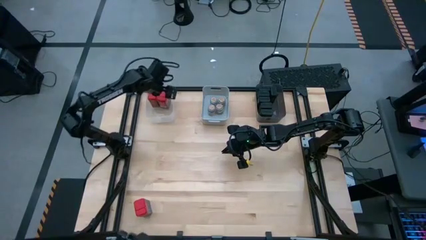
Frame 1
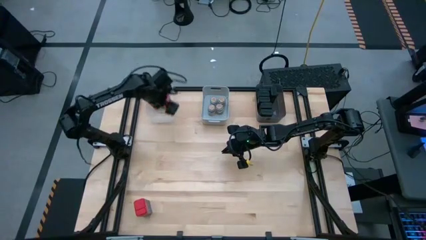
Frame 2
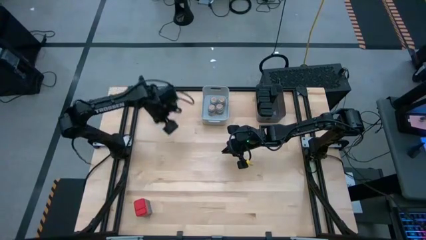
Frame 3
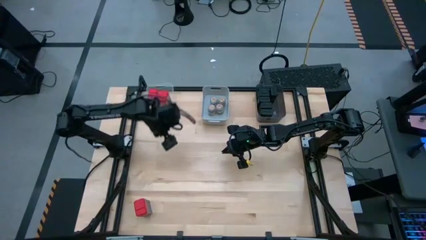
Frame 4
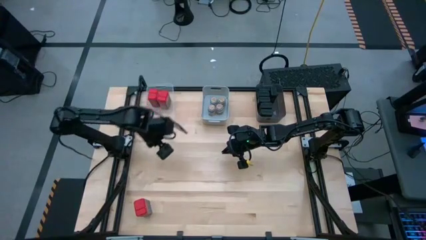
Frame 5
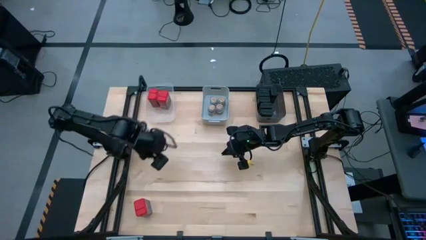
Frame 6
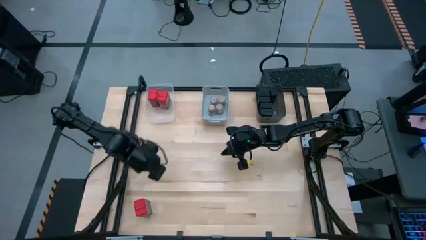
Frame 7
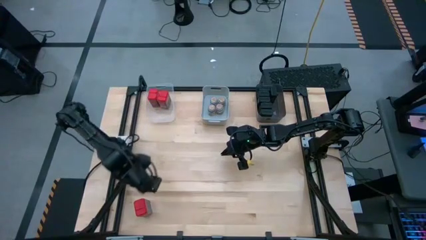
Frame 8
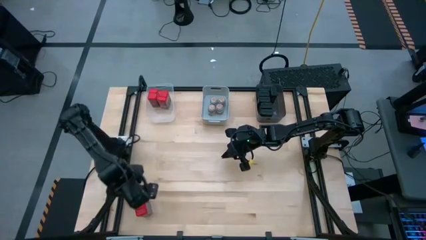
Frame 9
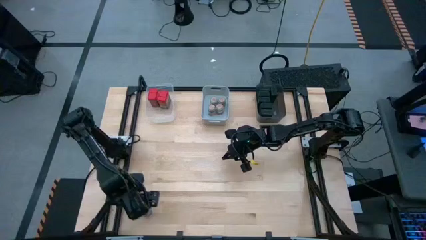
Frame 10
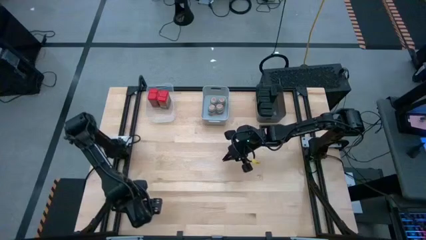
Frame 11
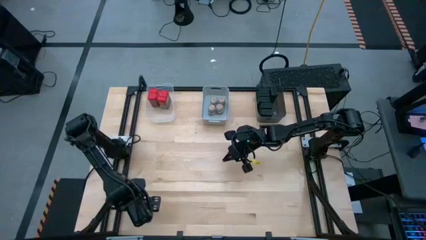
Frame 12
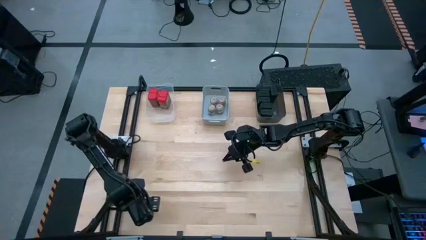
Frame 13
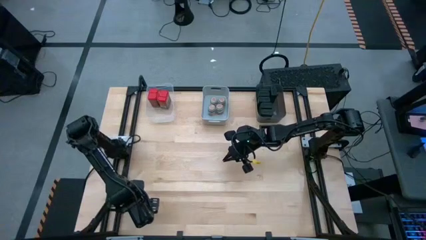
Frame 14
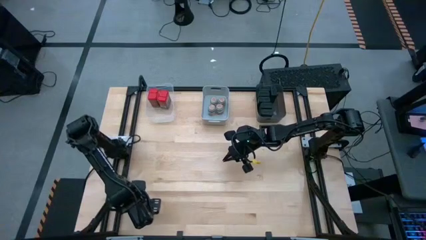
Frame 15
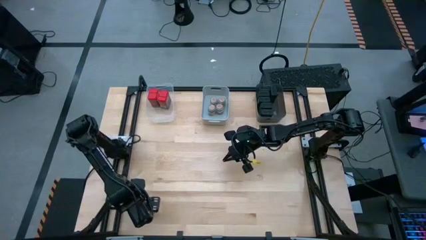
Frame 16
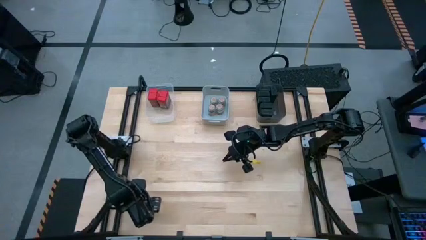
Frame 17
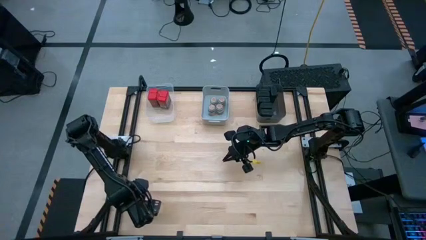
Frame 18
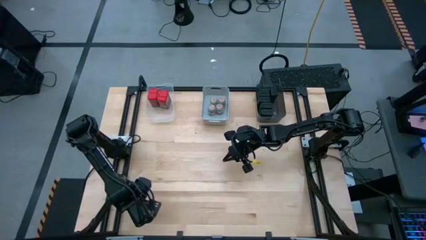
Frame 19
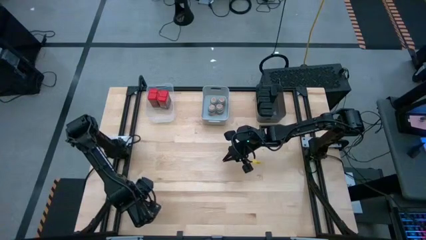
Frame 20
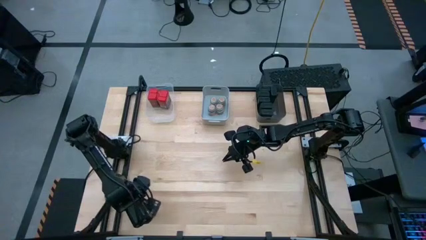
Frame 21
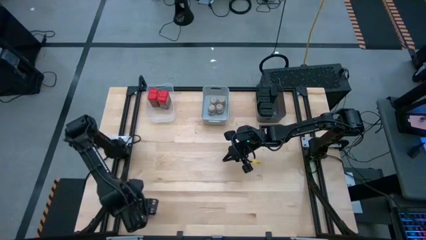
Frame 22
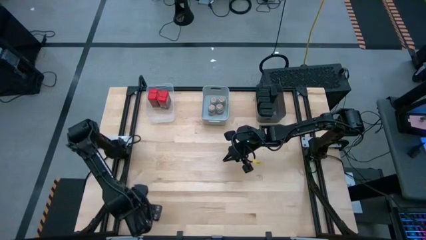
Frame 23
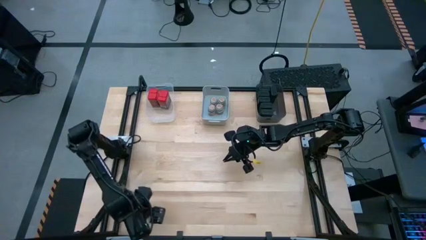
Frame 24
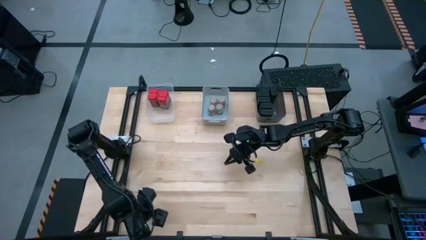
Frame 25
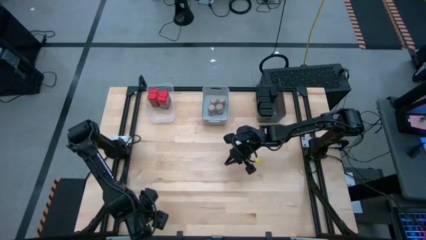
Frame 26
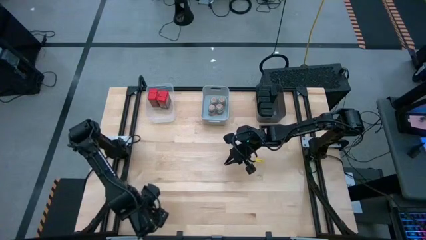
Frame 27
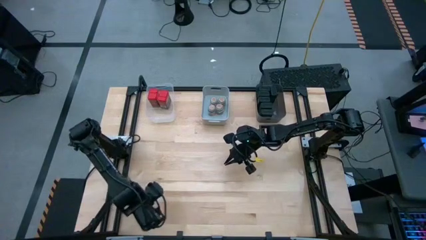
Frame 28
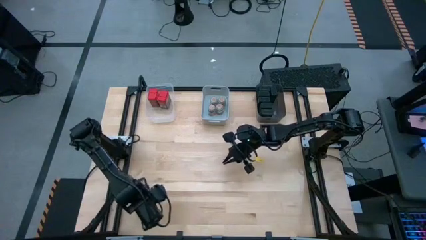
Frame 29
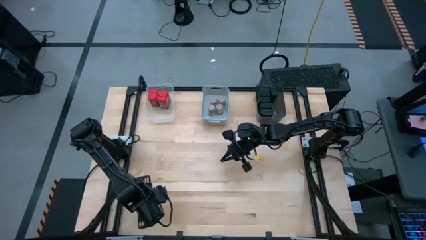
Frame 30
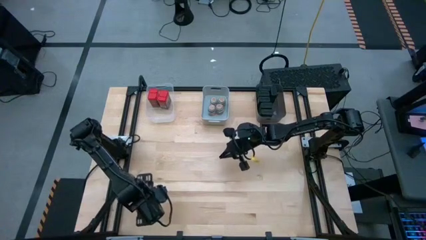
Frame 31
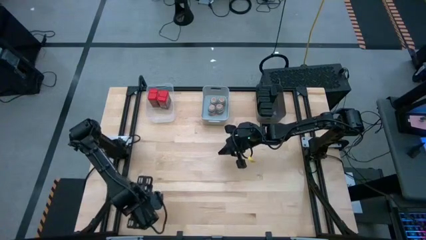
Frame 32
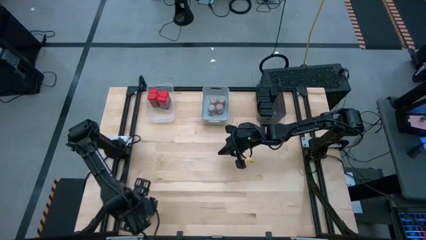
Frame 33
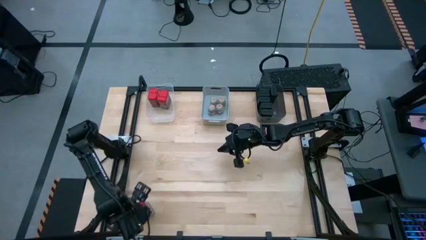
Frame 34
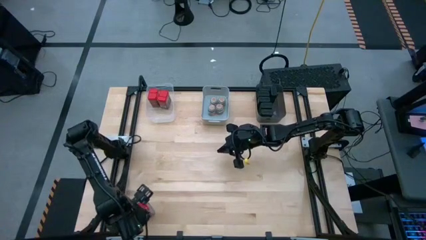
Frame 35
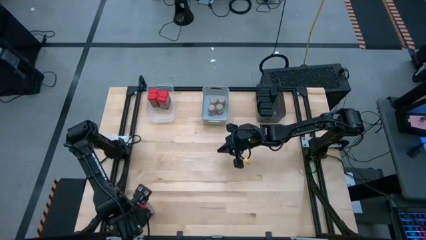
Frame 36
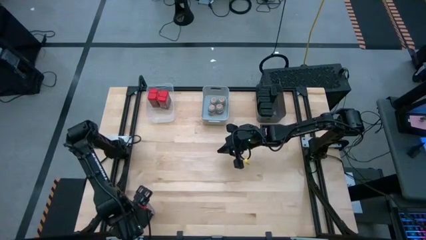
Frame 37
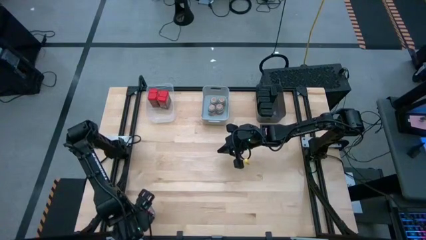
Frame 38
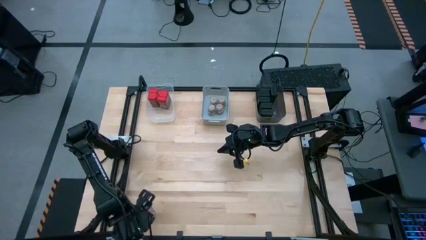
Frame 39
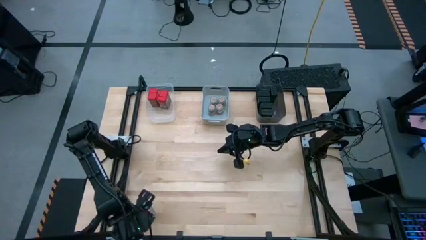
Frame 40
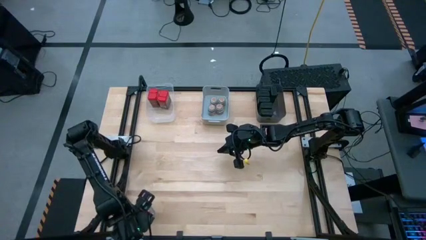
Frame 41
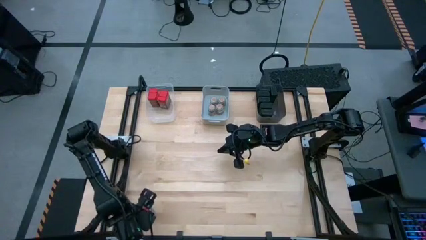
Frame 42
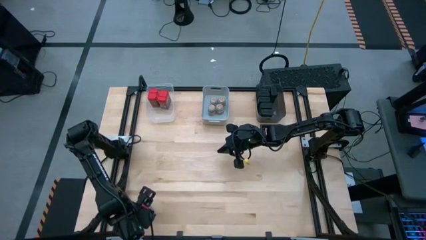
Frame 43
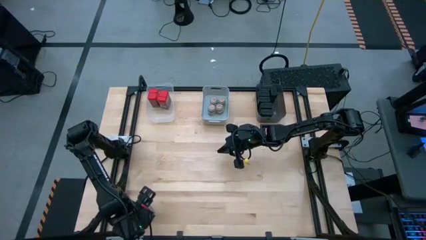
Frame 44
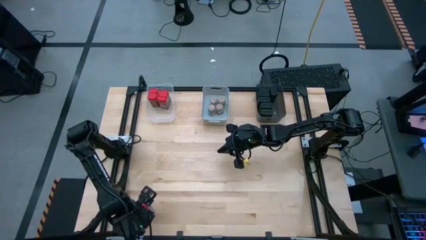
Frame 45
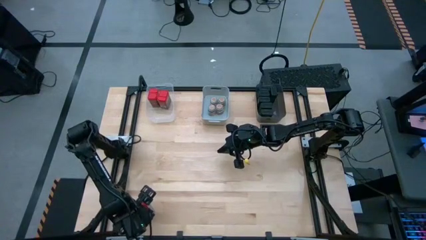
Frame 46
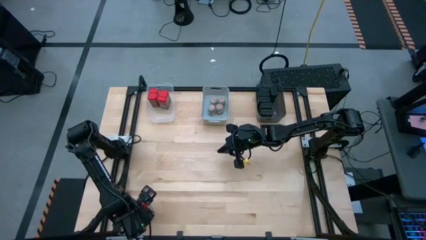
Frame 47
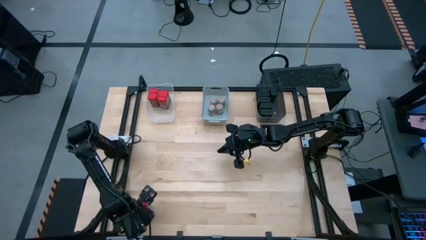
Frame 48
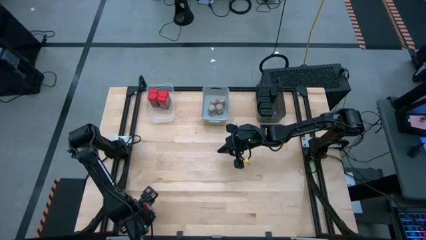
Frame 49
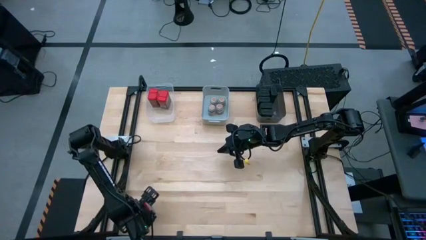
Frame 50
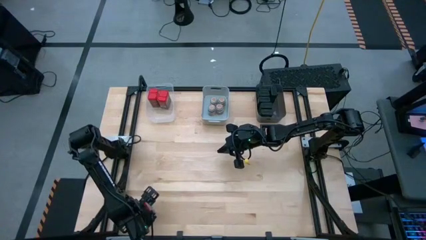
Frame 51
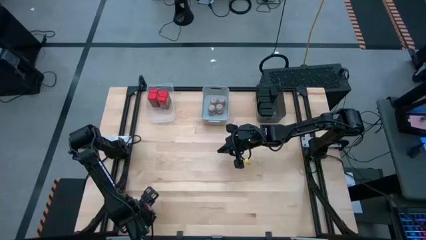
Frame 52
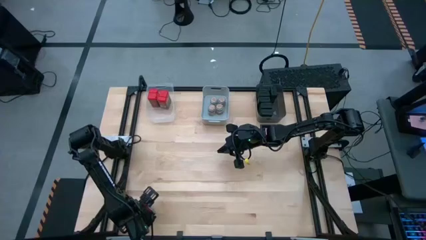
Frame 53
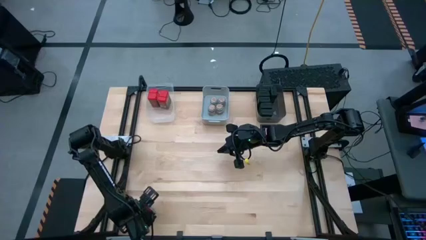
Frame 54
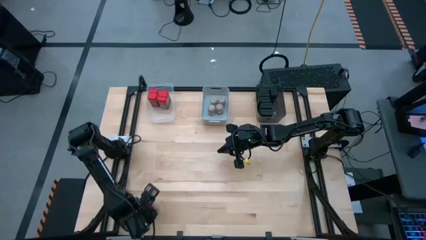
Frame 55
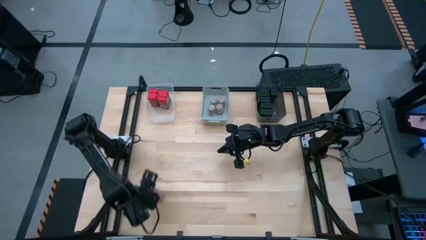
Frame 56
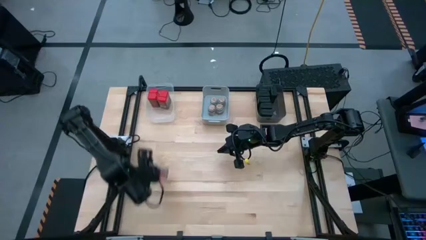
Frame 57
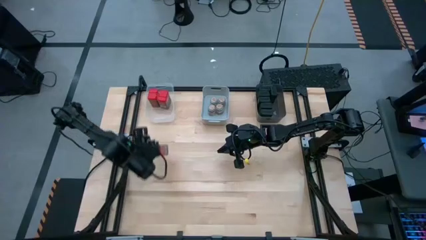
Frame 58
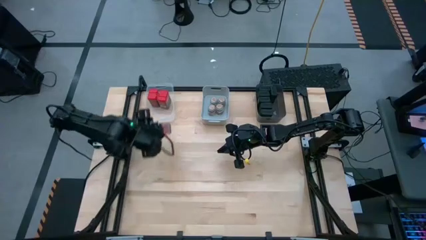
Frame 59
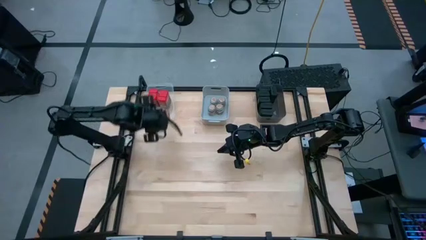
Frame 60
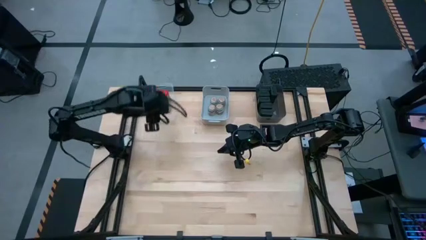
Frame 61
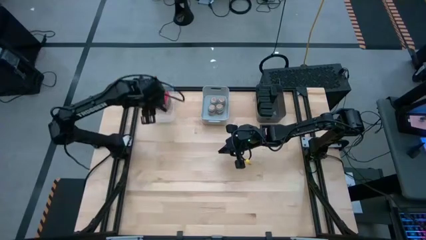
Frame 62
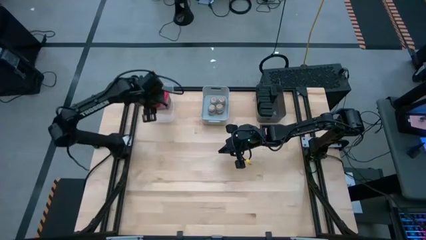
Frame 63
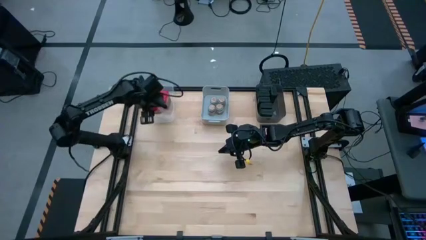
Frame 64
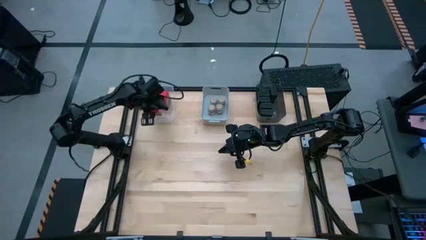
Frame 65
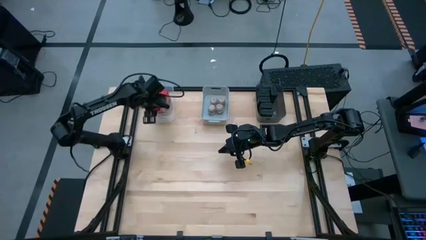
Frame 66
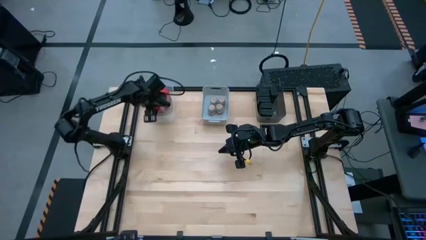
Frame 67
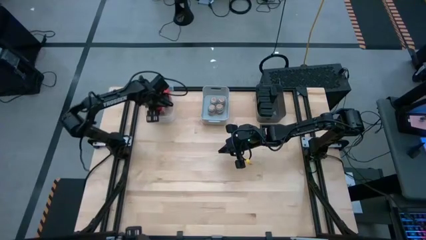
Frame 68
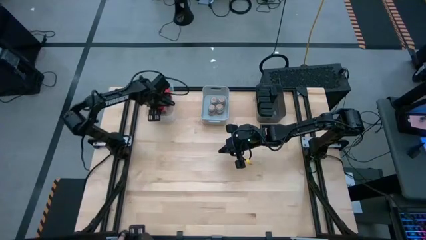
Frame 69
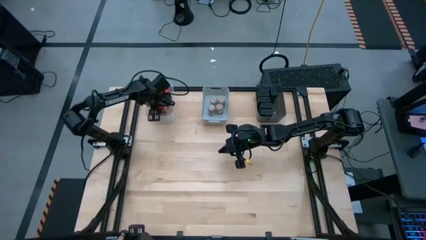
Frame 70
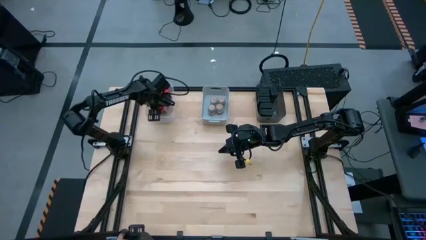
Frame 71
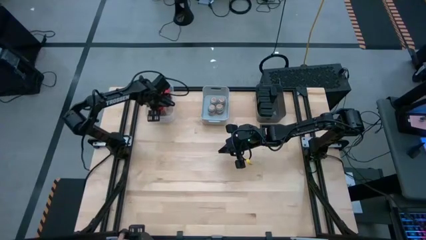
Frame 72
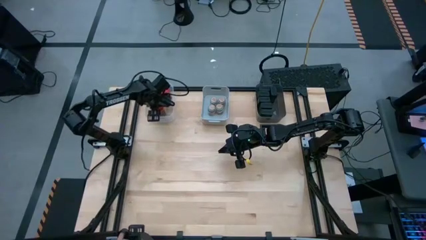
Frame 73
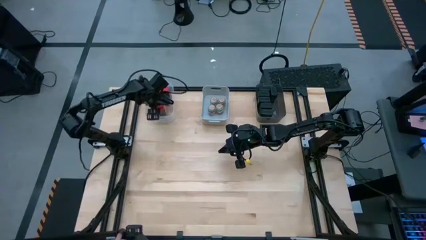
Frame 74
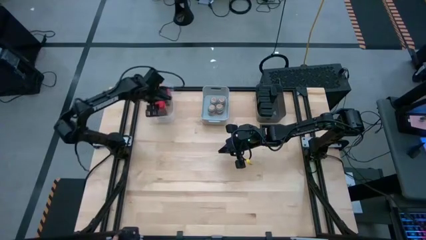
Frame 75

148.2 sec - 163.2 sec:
Task: Sort spices by type
Put the red seasoning can into the transparent bin

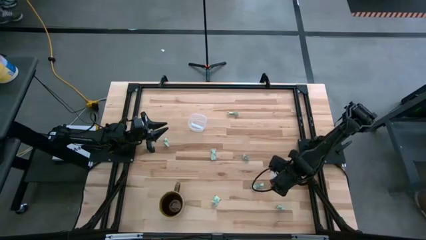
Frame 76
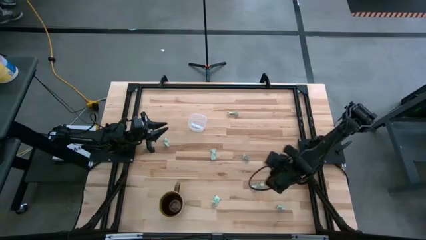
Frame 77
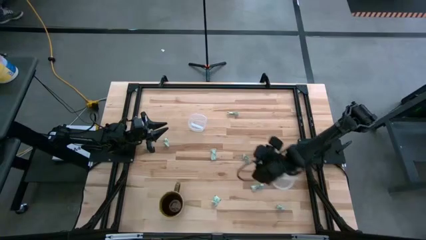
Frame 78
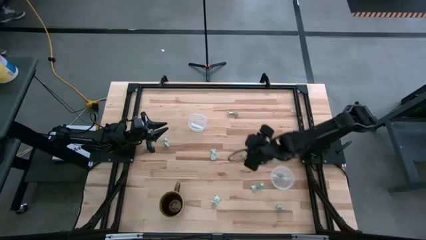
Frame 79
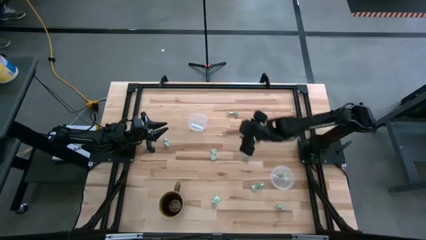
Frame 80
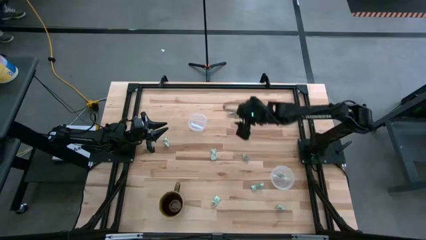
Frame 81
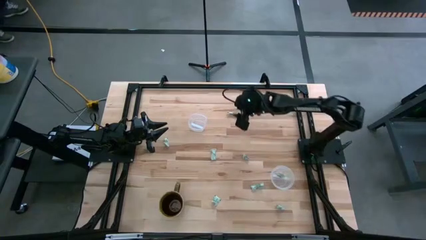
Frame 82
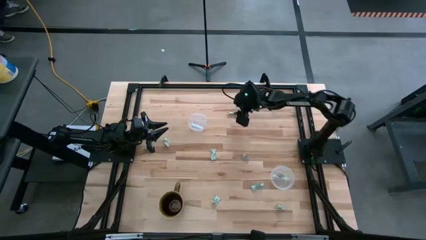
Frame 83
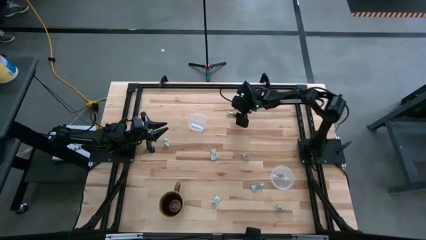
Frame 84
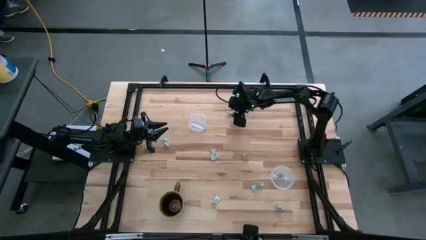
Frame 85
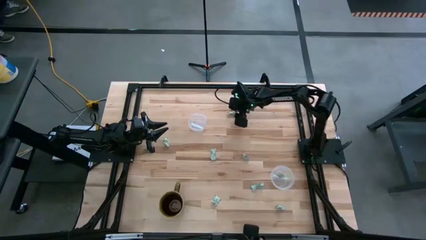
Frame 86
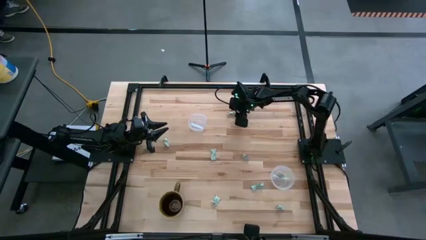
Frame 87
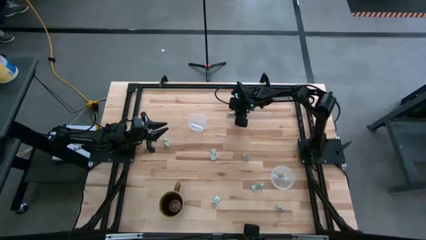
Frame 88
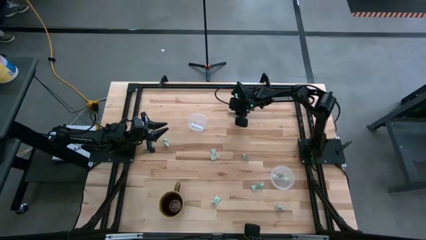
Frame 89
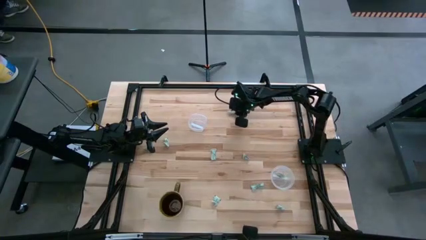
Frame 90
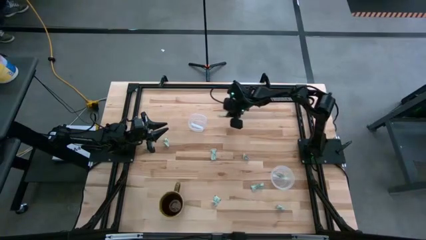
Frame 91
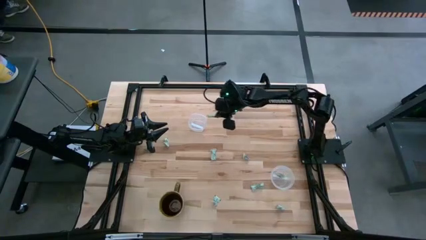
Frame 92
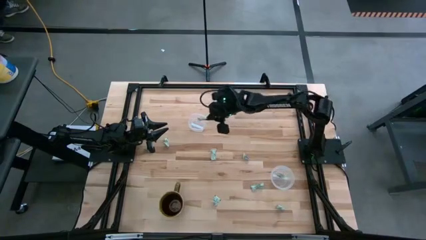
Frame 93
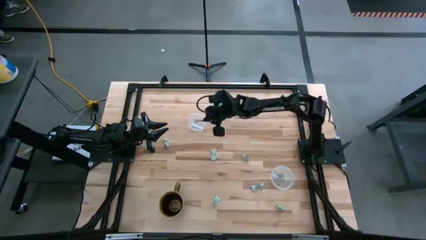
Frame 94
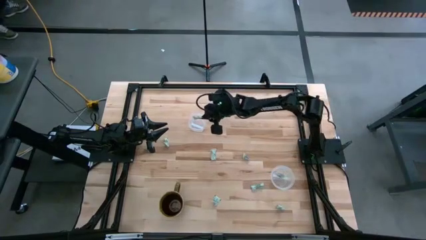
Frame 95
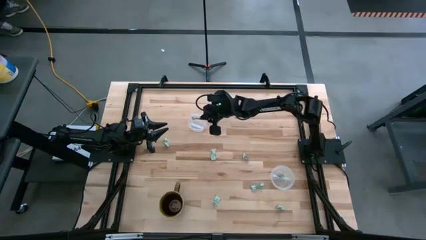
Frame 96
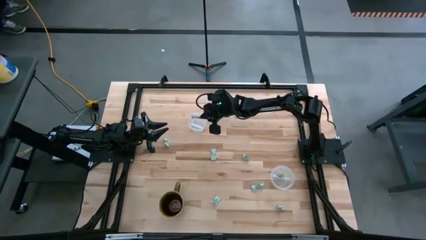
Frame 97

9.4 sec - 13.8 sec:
Task: Pick and place items into bin
Put the white stevia packet into the top transparent bin
